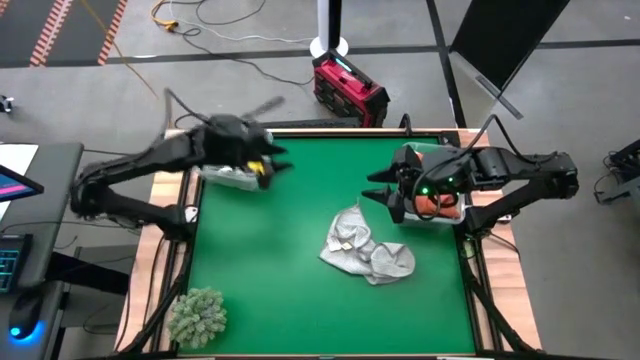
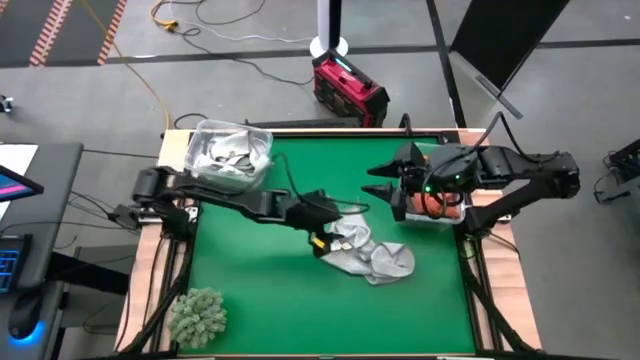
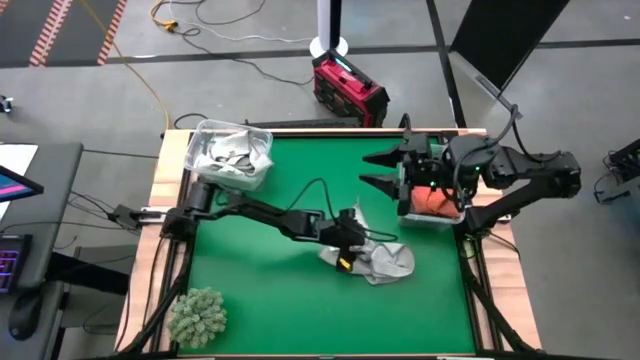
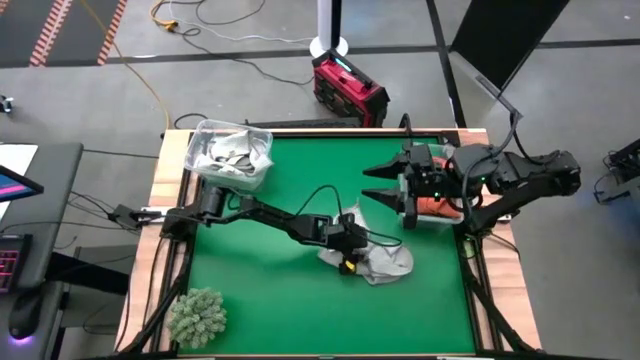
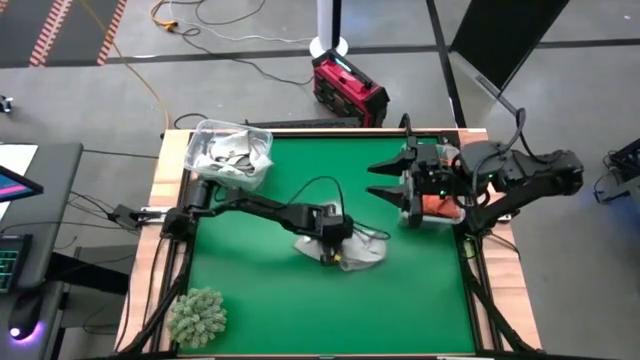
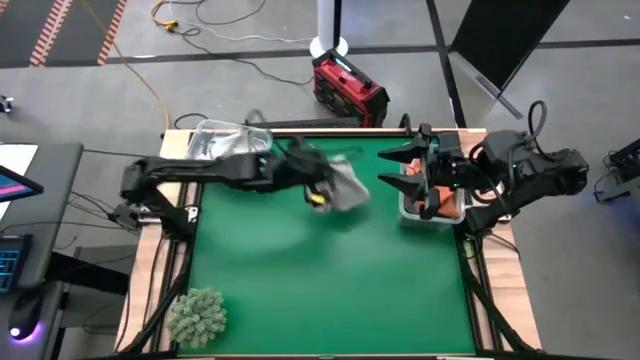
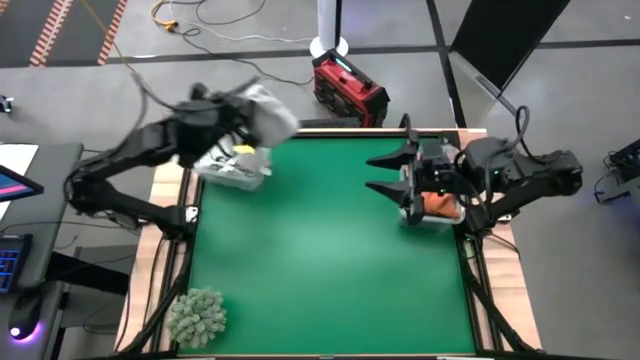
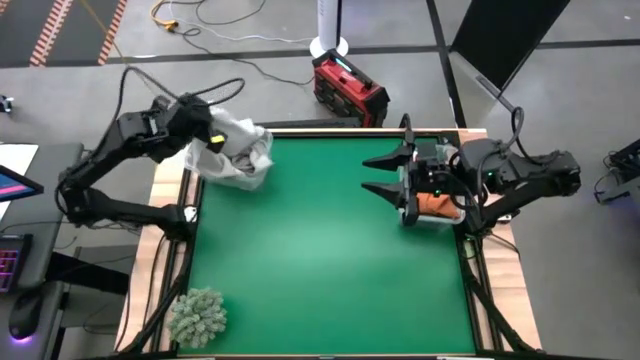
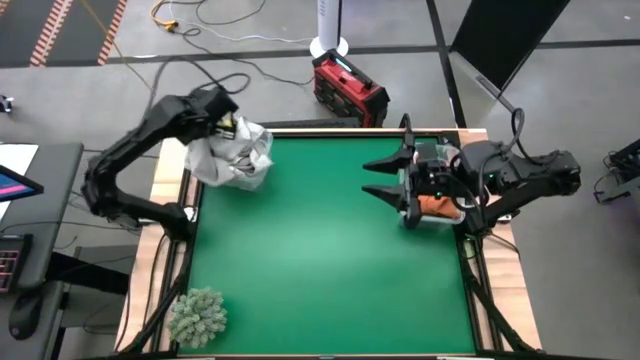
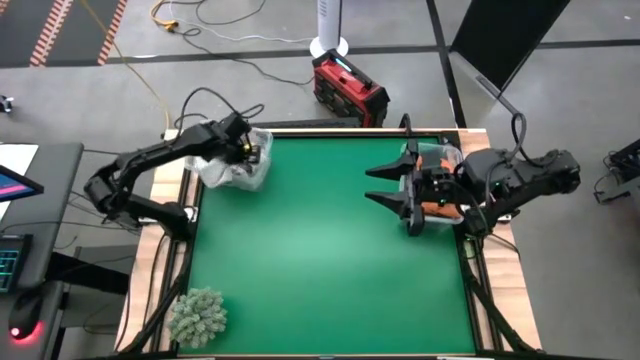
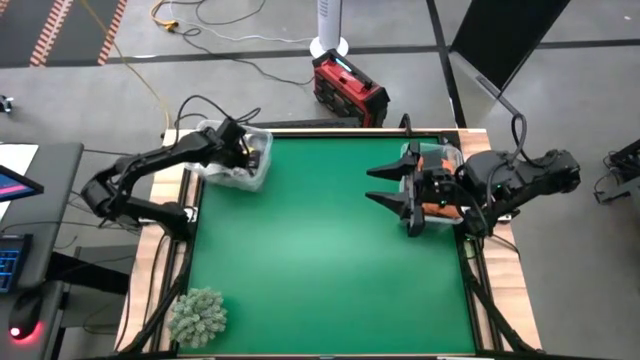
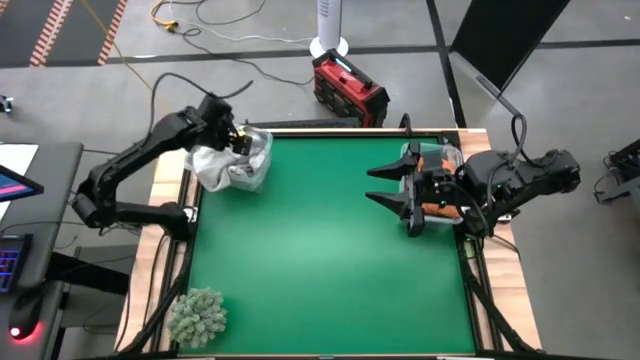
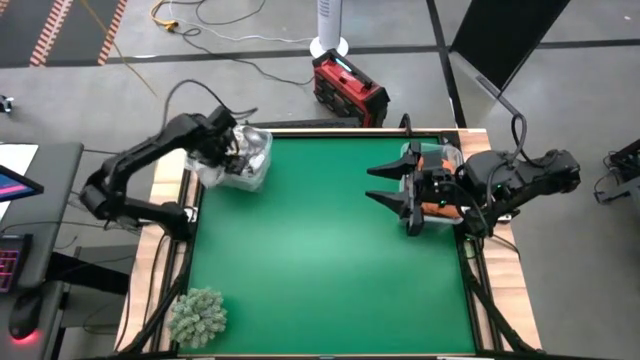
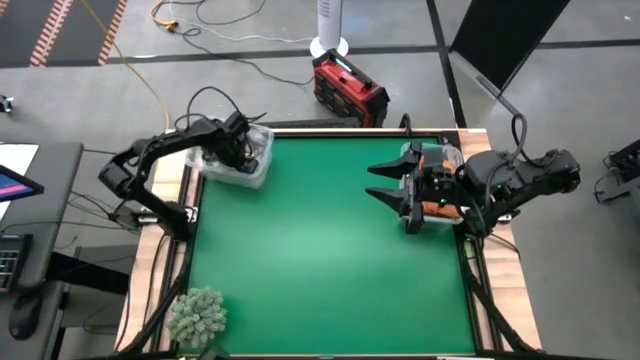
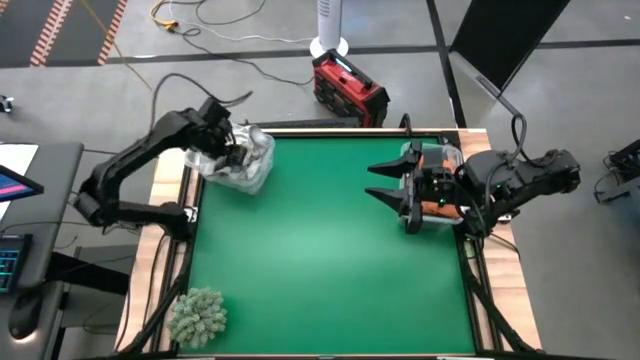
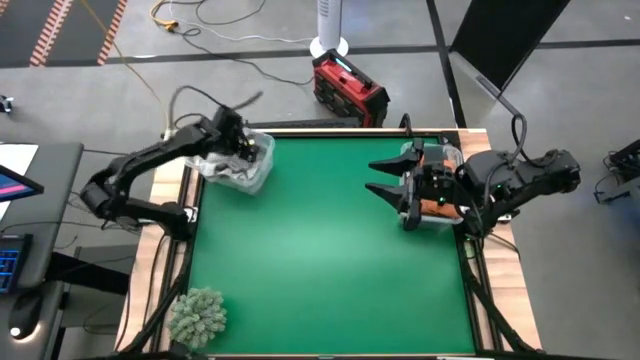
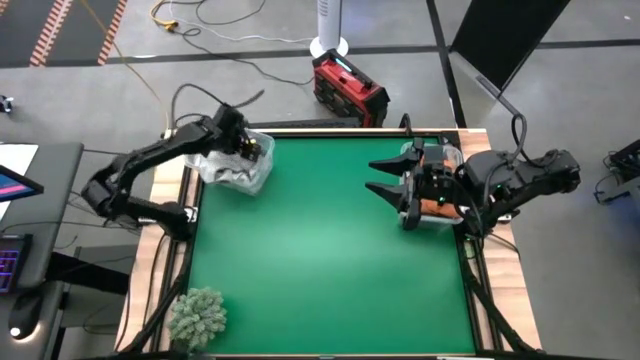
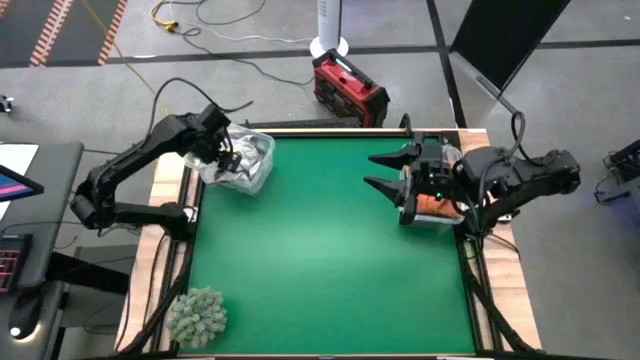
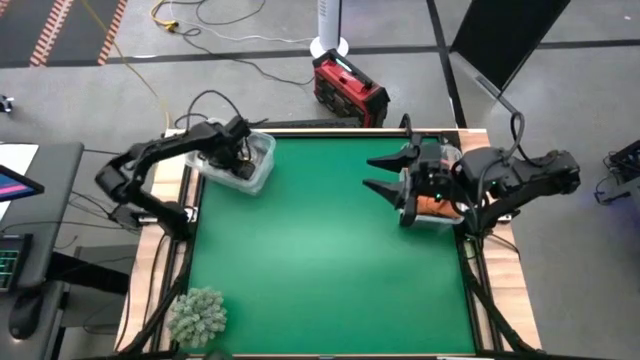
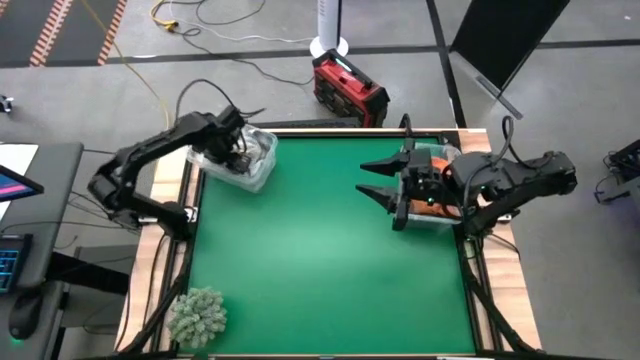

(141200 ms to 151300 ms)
Task: Sort towels by color in basket
Put the light gray towel into the left transparent bin

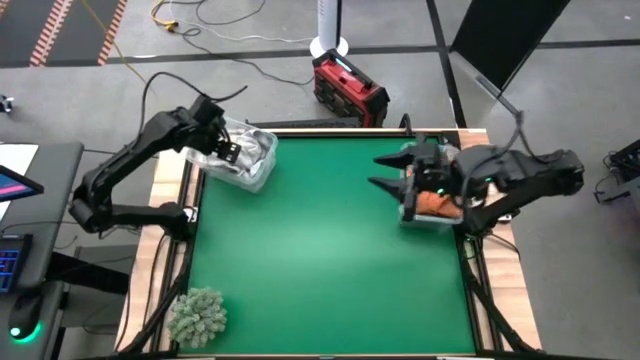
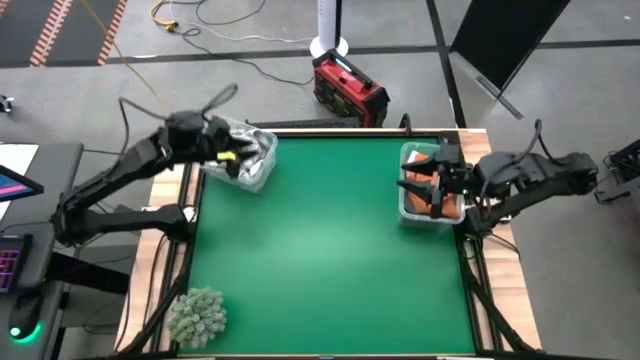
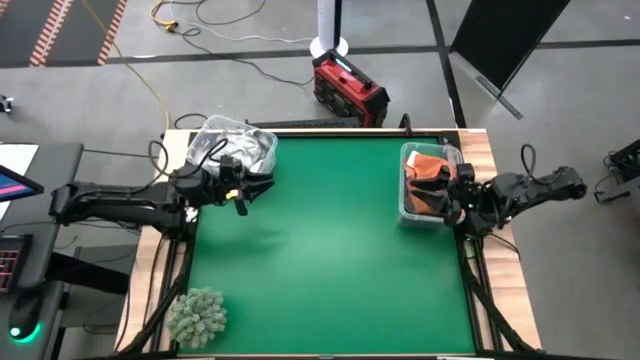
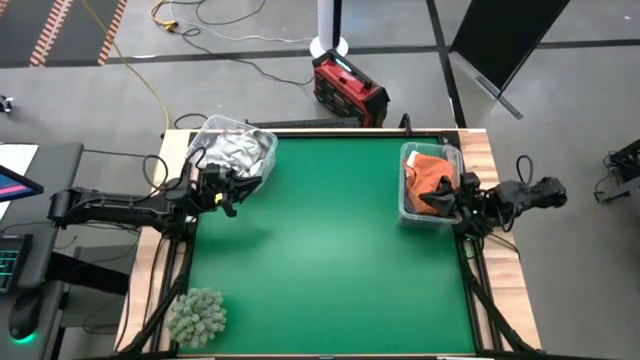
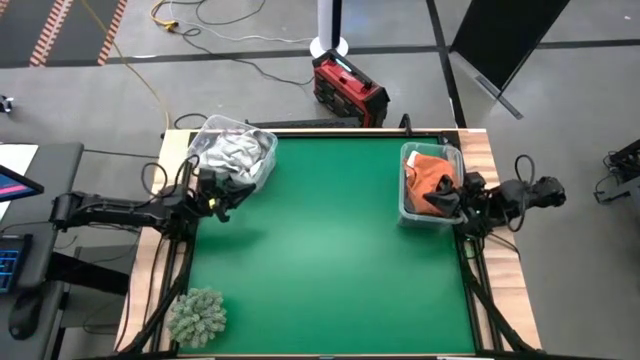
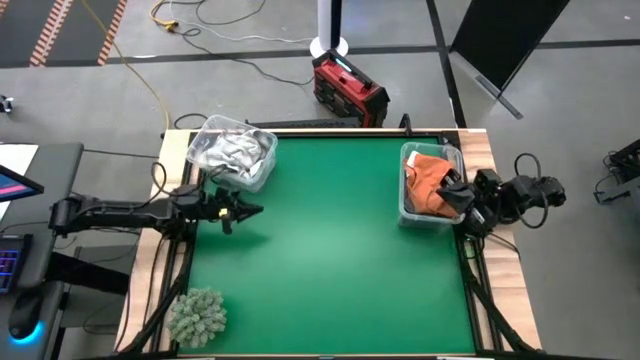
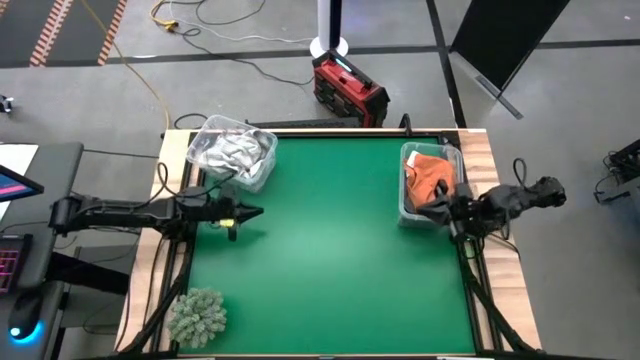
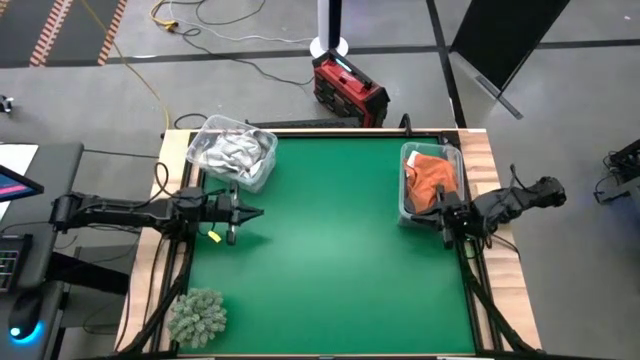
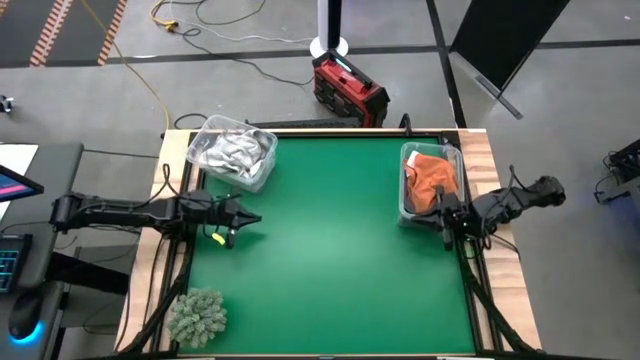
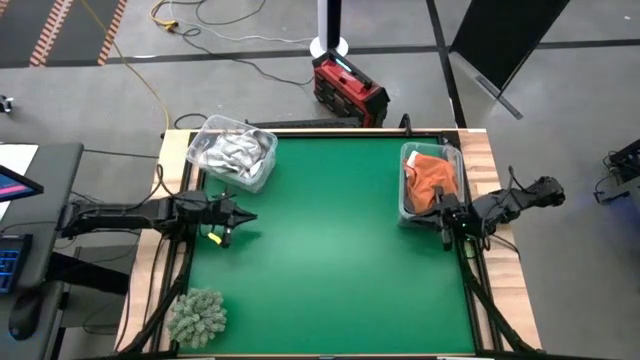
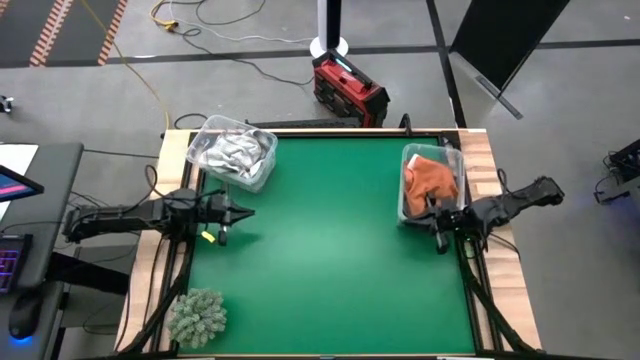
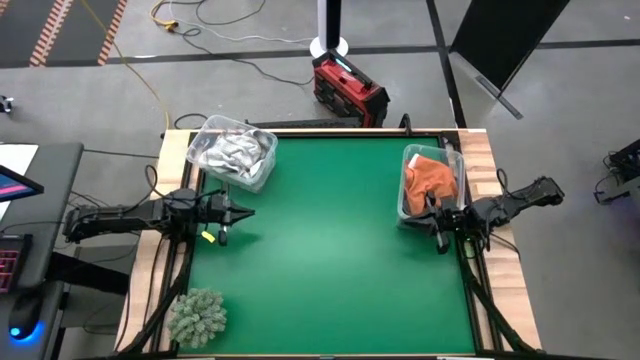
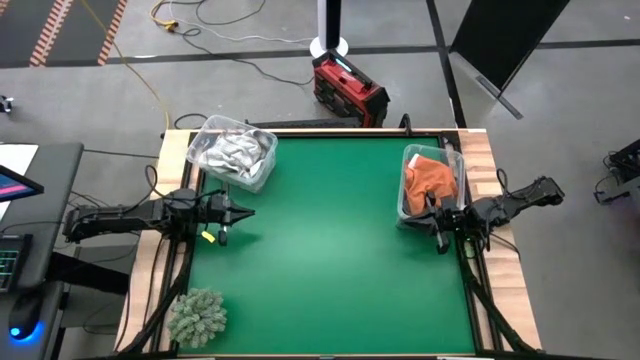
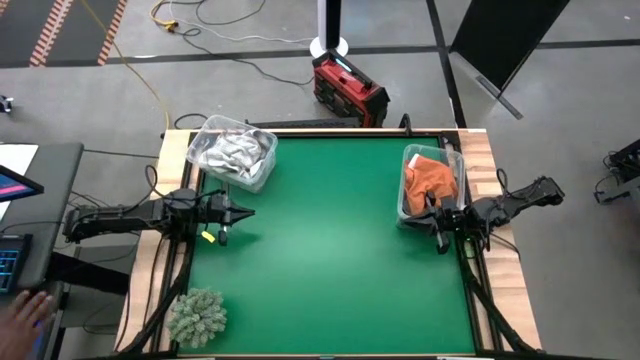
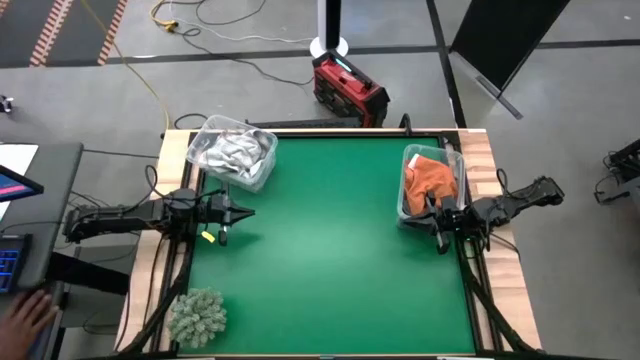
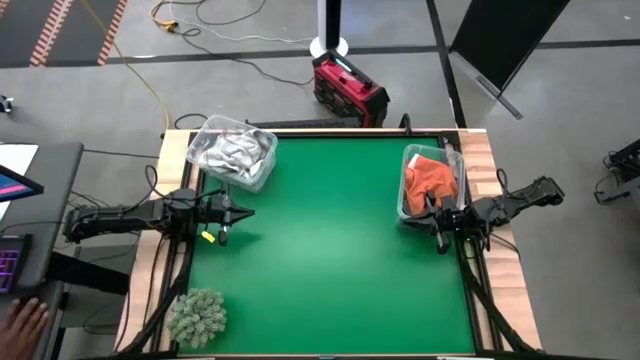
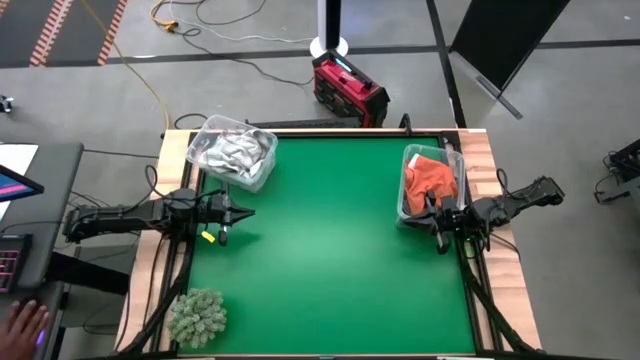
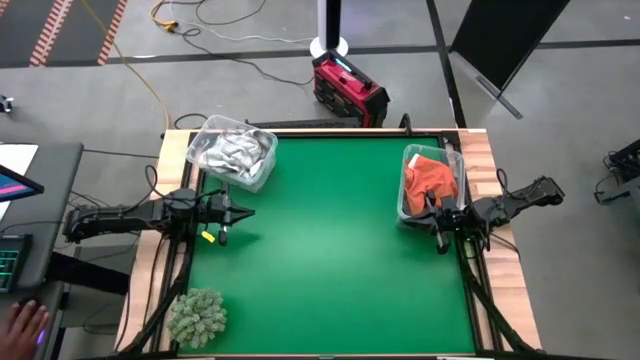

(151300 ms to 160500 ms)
Return to Home Position
